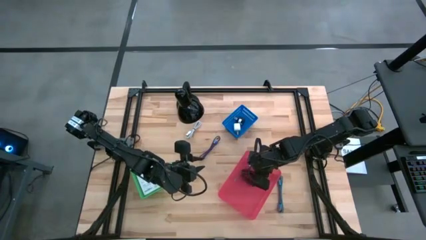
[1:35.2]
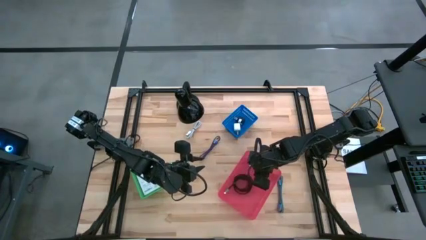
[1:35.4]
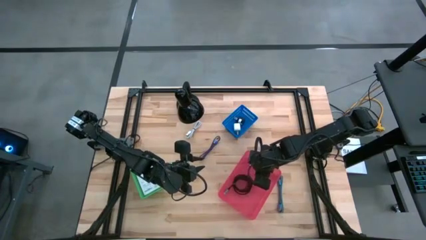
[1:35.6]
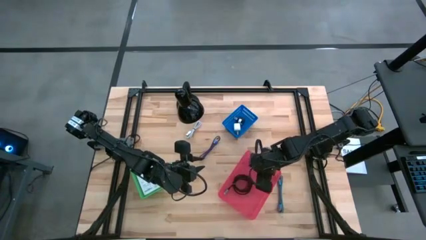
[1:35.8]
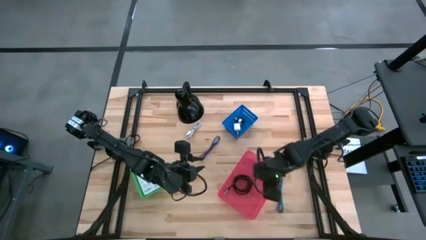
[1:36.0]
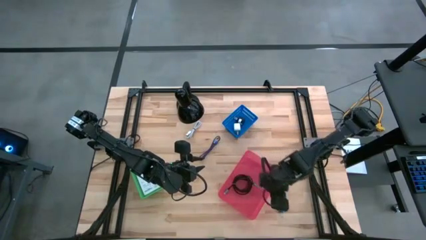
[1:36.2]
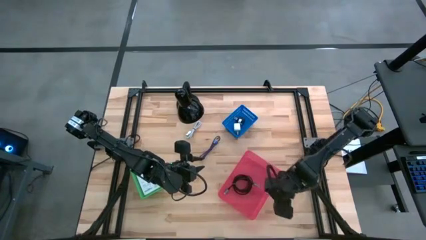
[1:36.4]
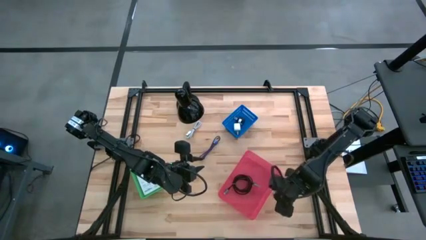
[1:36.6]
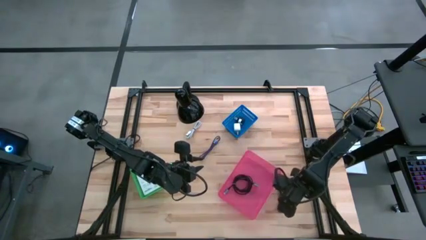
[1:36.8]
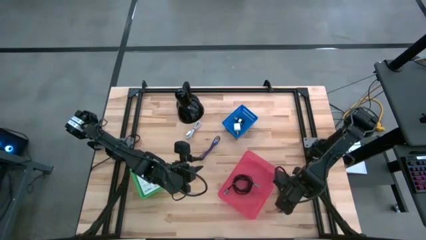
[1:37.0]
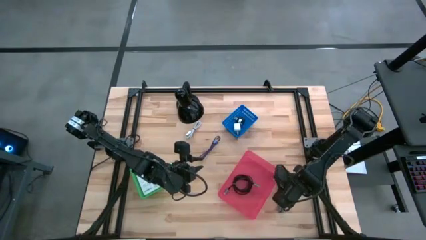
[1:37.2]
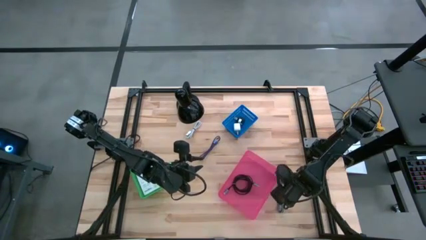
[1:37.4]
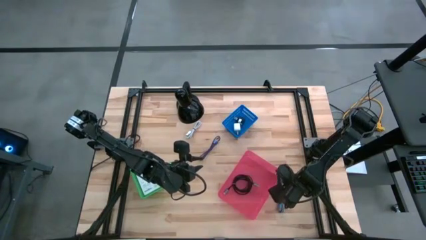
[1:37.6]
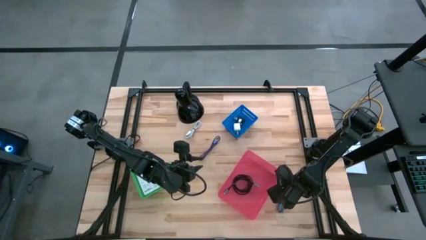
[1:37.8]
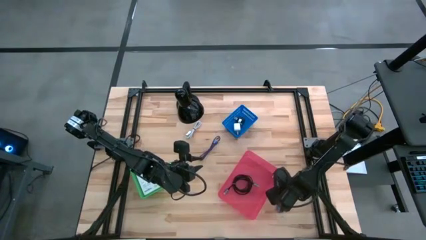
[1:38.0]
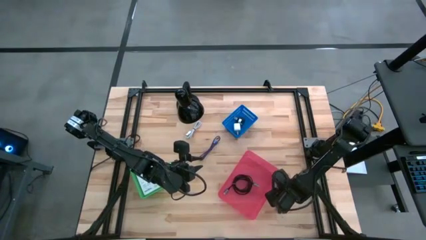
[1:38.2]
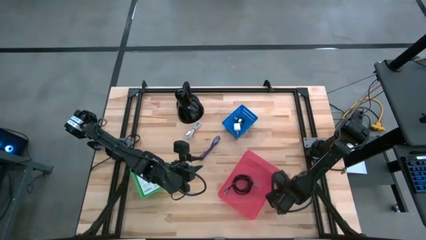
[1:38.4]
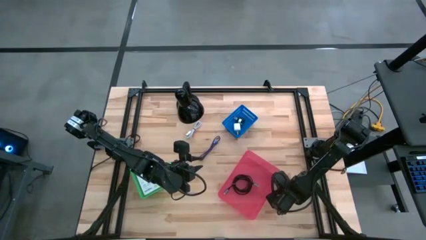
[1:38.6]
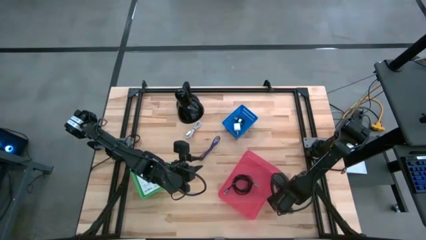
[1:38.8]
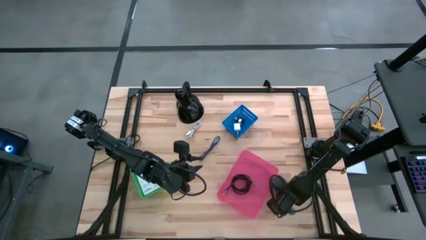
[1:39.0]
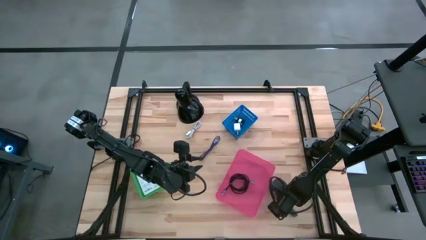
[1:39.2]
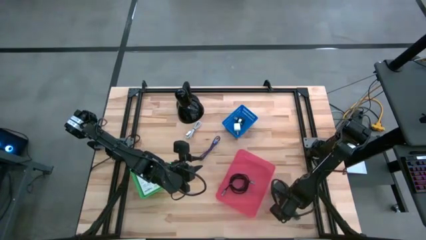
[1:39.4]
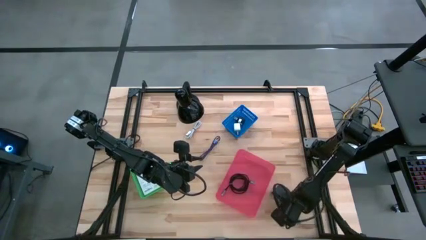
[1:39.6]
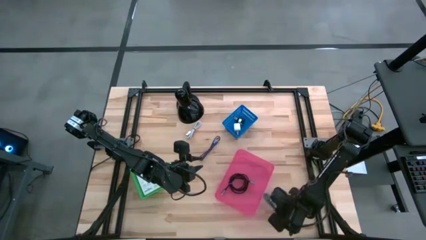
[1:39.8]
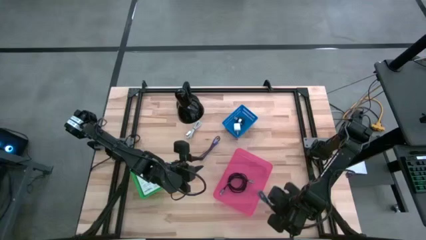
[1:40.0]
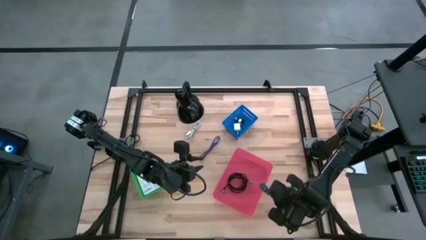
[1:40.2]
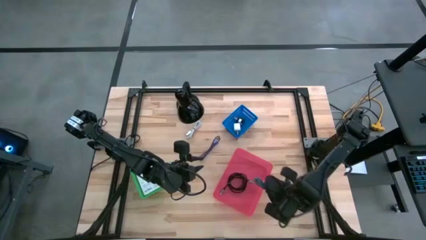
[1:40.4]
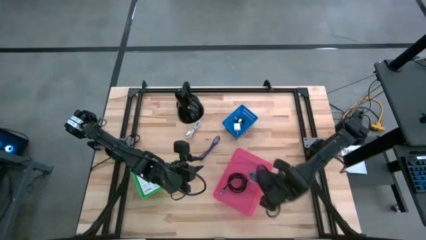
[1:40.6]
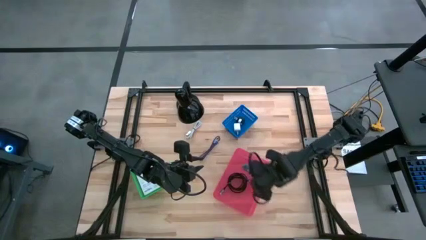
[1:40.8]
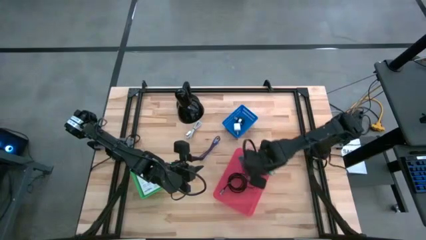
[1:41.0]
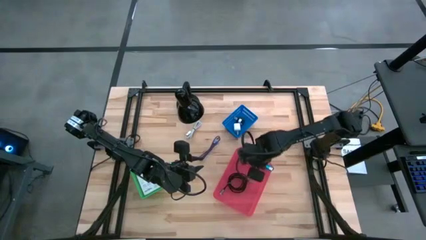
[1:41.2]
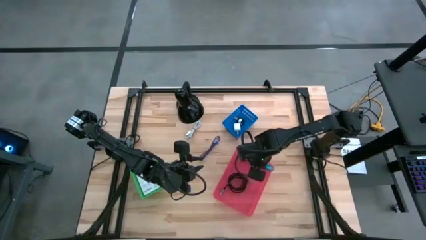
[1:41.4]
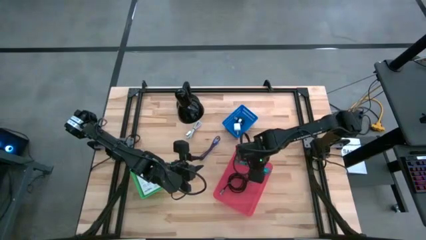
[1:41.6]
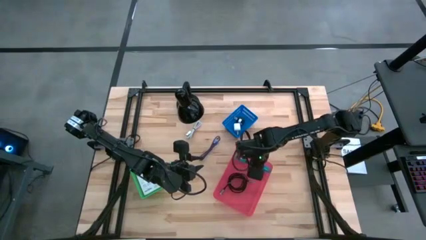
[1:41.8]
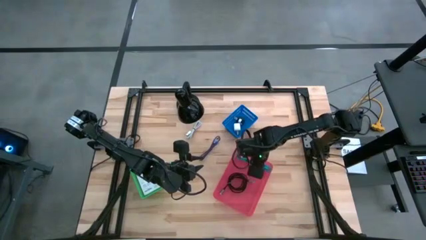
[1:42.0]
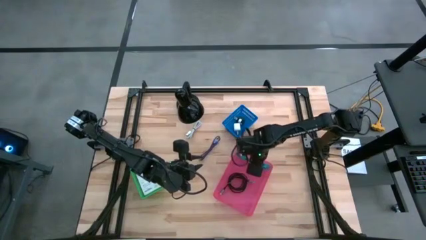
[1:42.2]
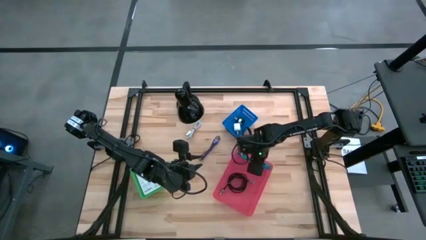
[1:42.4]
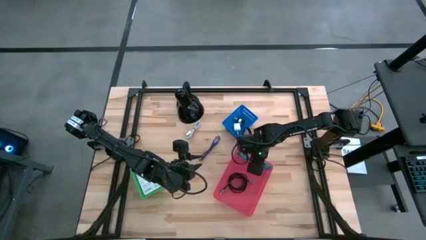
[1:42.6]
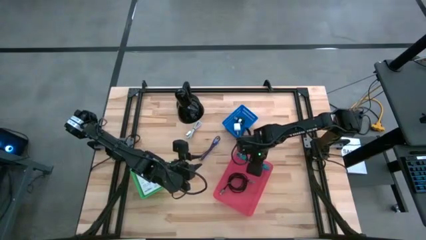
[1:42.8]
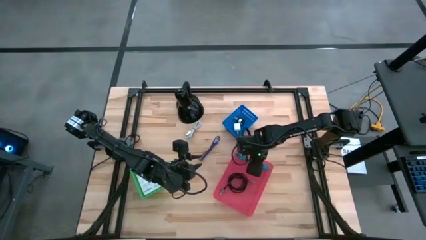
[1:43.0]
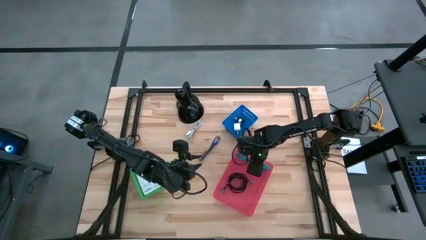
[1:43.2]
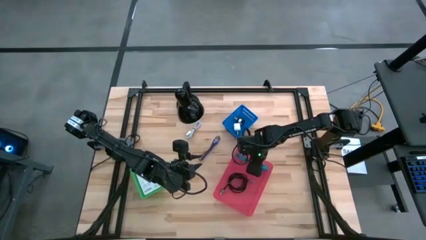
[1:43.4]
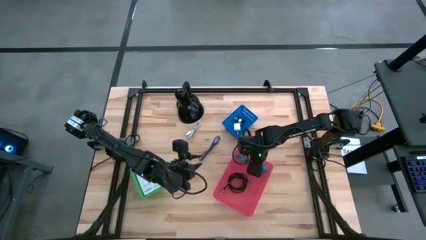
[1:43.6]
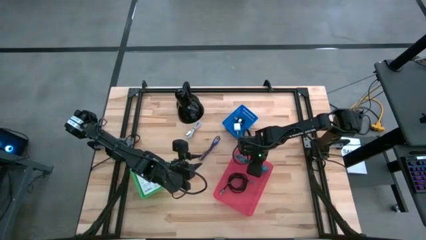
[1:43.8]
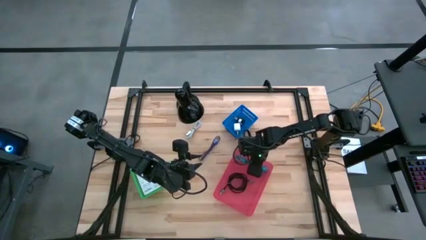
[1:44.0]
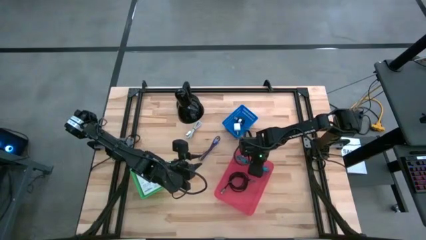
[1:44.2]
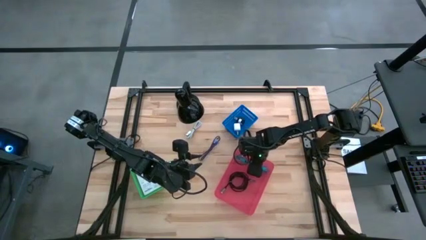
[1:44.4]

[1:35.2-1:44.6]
Task: Pick and place items into bin
Put the blue charger cable into the pink bin
